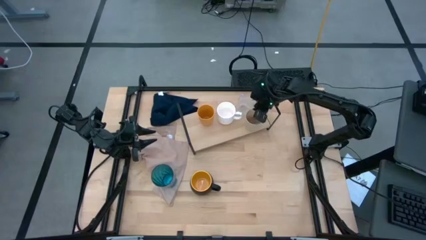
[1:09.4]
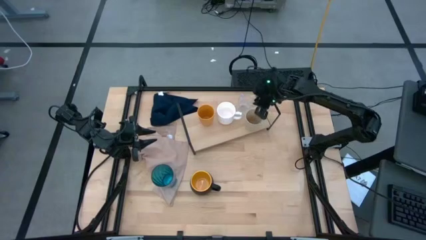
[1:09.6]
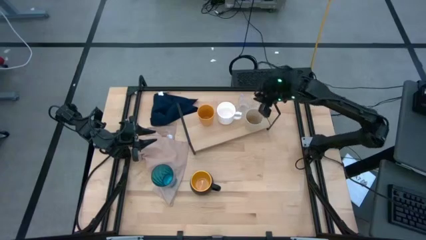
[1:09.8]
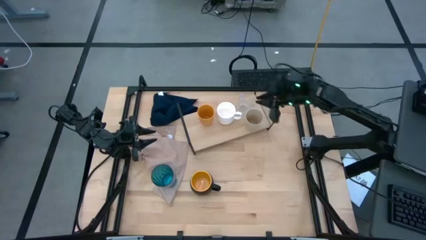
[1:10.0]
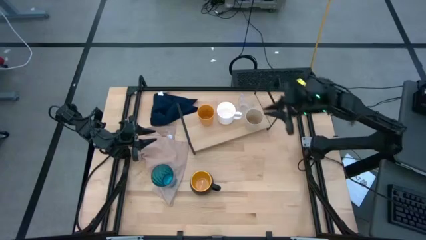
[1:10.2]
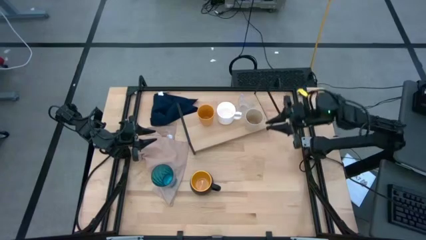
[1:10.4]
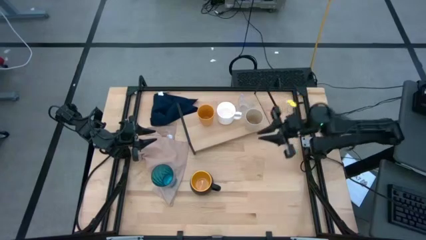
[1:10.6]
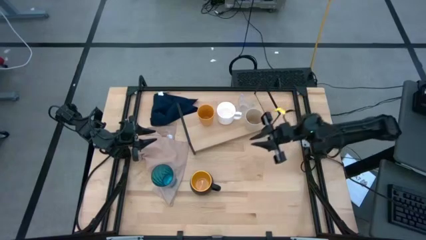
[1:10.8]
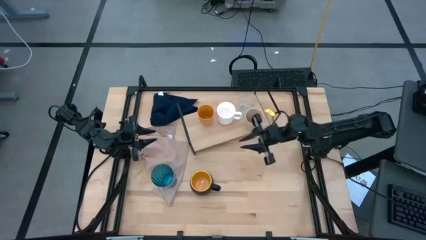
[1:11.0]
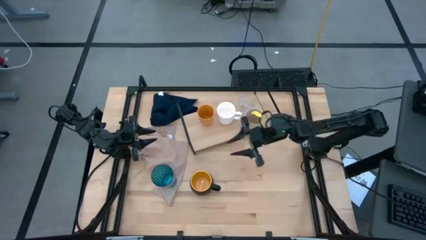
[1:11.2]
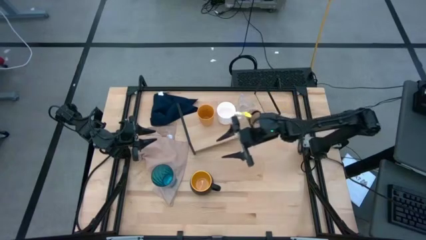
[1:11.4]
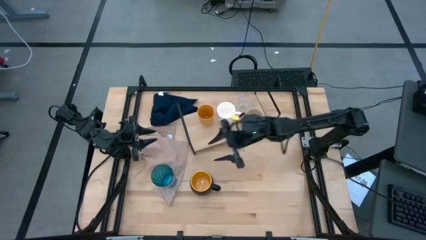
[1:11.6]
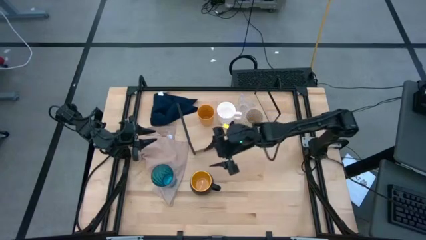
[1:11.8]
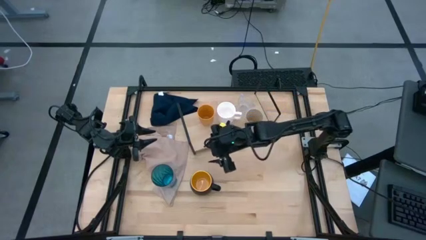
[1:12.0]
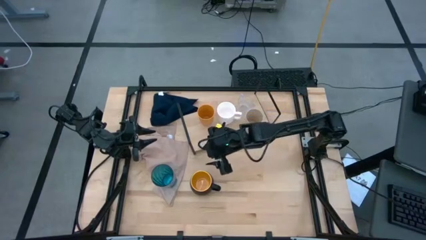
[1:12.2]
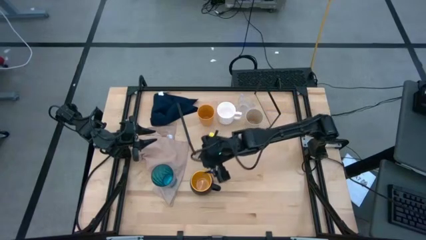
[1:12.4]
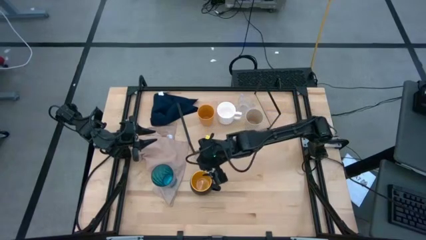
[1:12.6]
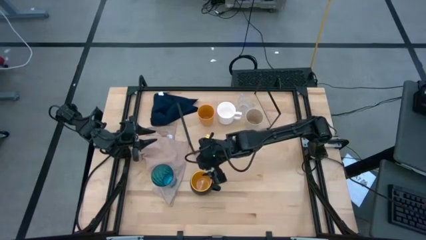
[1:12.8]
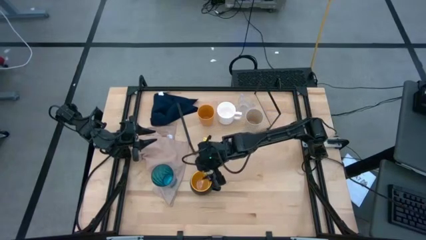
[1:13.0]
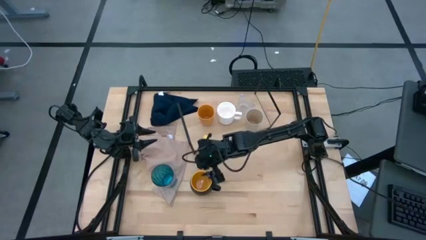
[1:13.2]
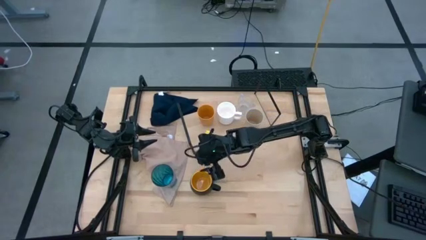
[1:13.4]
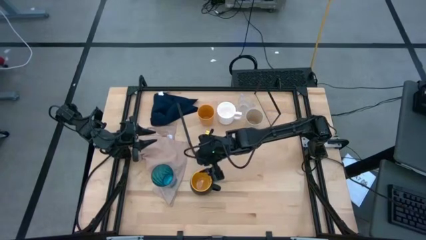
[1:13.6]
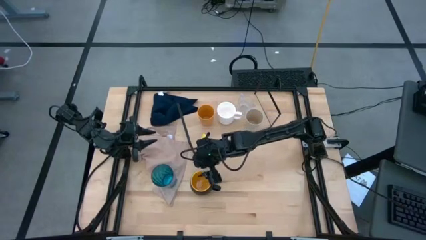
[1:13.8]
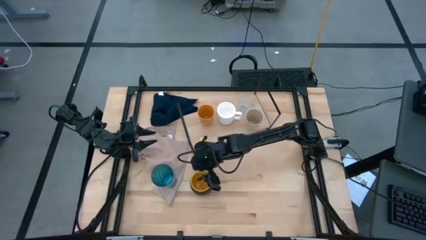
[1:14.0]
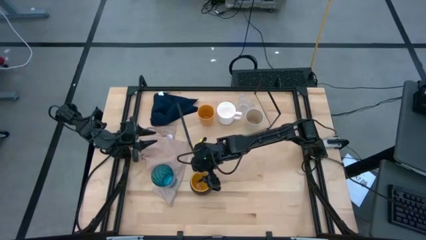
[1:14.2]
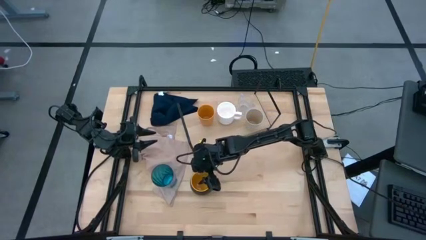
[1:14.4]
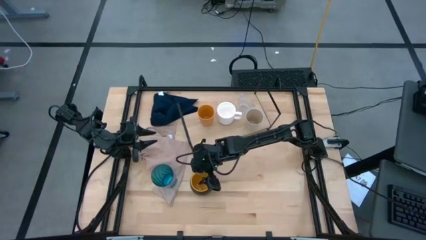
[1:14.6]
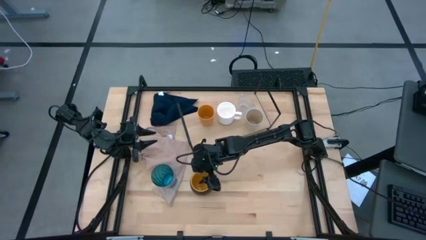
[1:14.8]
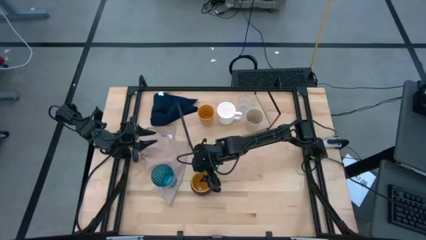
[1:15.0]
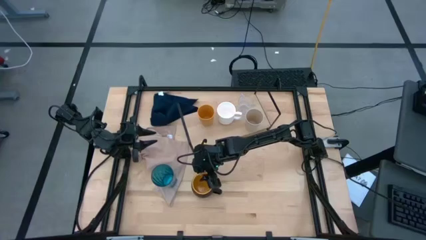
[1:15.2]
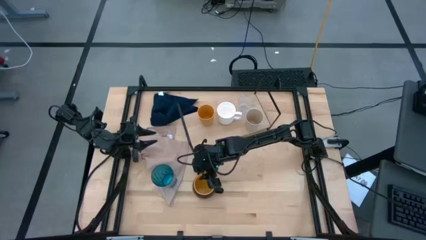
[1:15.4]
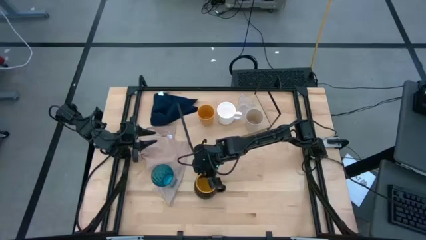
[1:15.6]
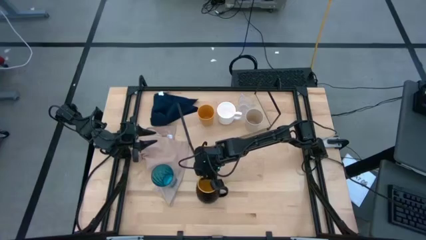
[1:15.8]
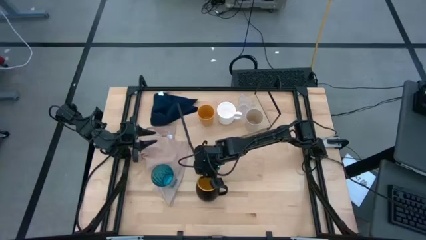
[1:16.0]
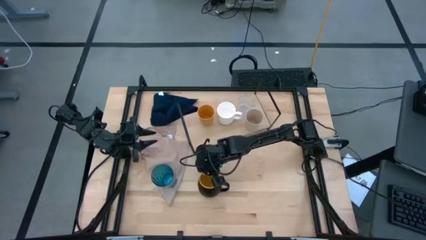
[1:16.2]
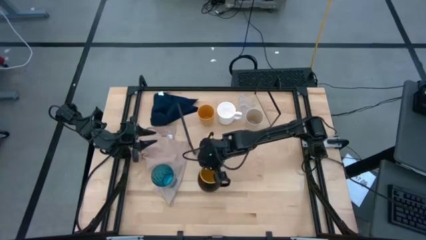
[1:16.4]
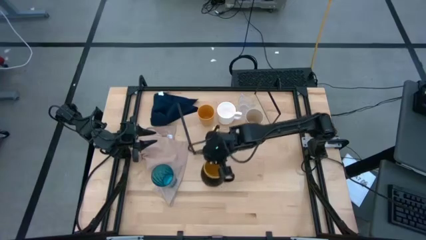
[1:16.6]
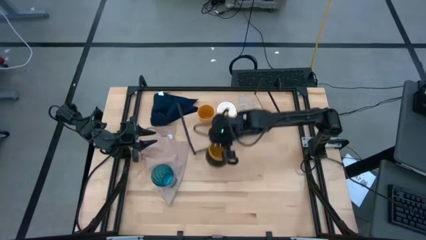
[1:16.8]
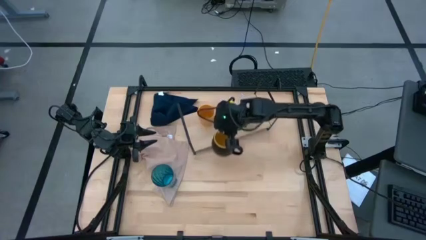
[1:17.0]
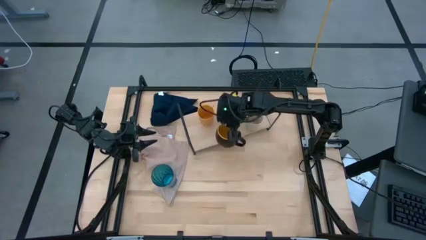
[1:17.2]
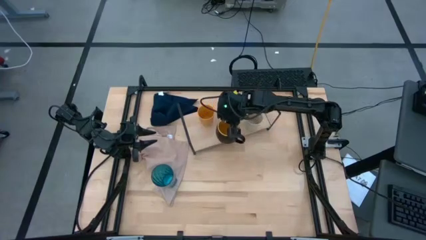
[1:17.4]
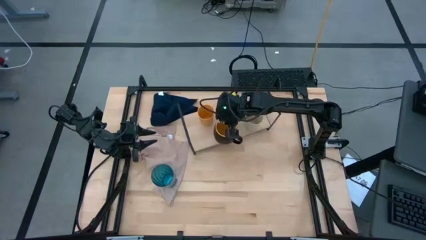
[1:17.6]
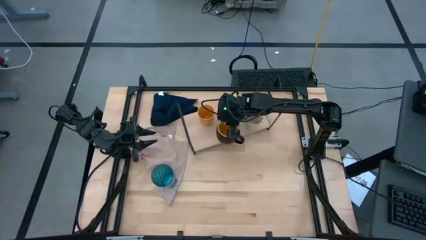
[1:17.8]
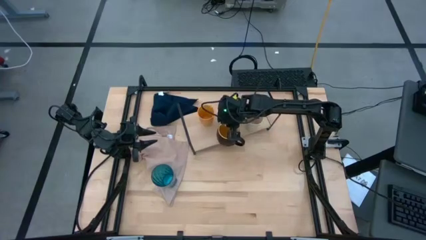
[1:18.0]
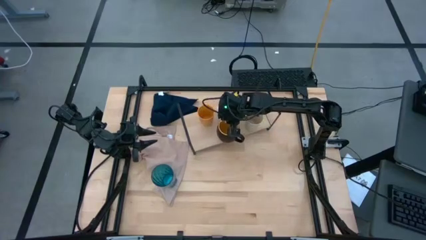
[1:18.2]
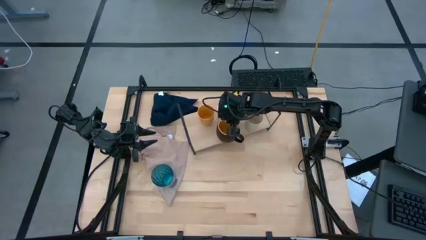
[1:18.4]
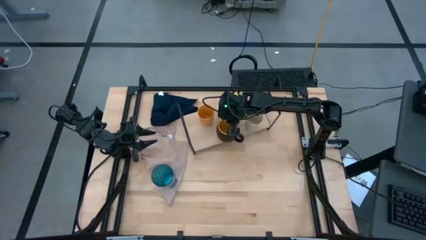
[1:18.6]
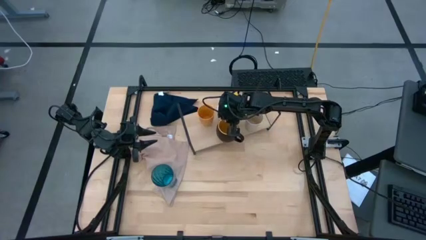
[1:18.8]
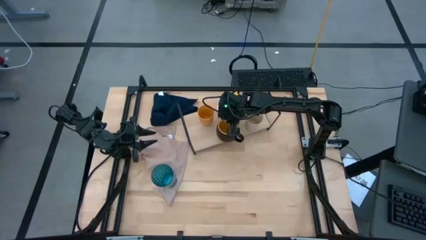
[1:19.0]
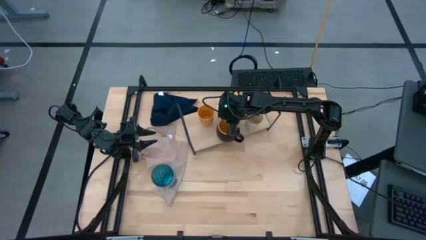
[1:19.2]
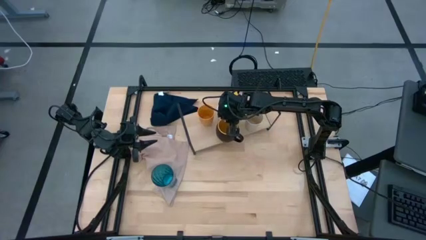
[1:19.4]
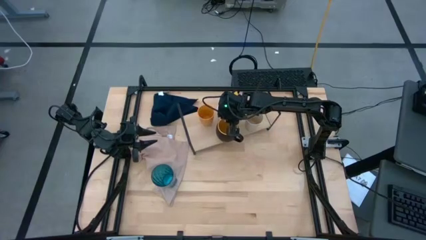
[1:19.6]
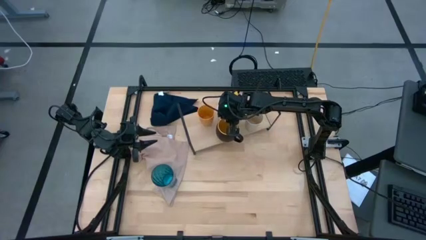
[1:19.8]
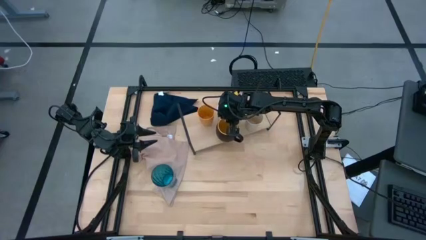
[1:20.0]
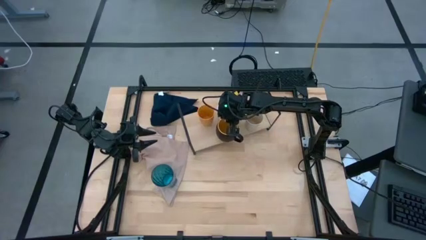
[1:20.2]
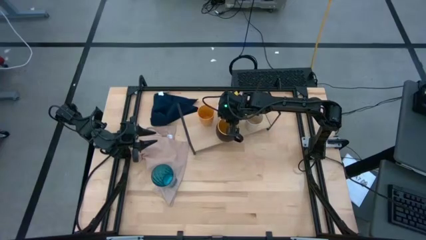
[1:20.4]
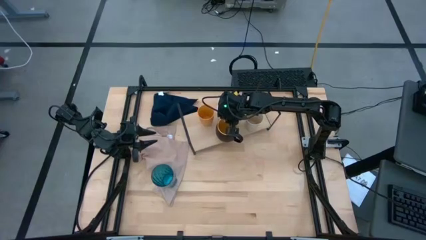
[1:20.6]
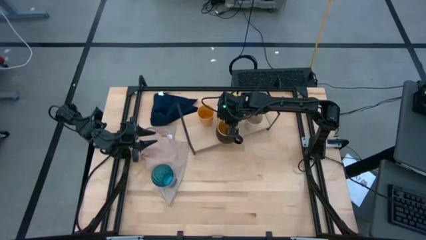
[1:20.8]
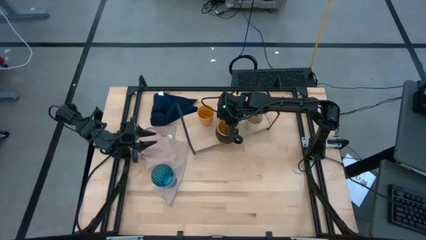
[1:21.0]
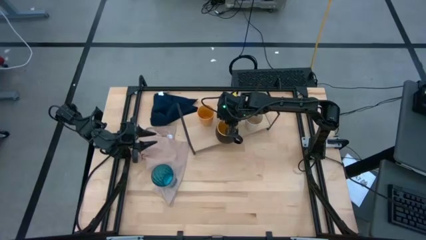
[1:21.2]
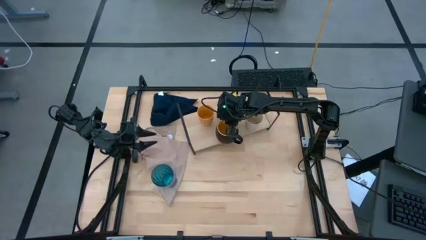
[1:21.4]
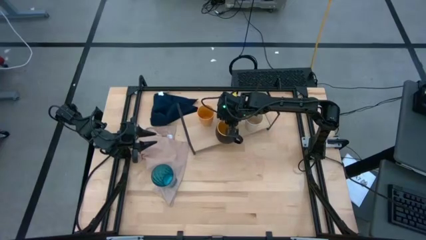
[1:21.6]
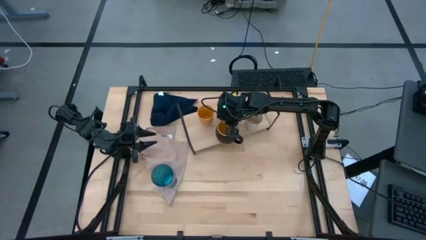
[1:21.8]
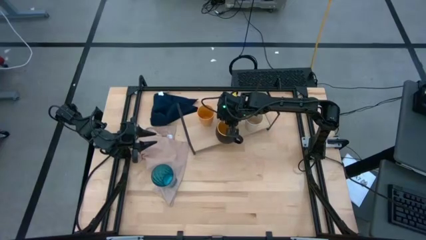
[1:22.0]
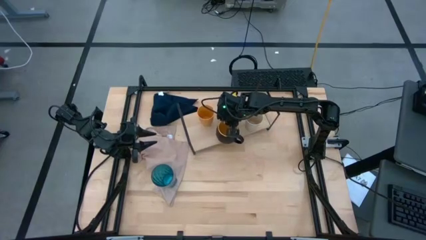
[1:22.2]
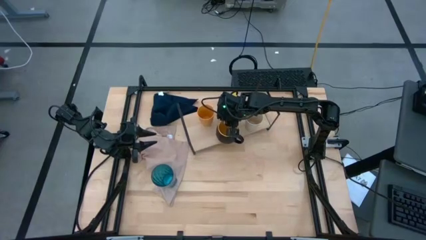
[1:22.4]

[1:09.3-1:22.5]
Task: Stack small to large cups/mugs on shelf
Put the black cup on the shelf aligned with the other white cup
